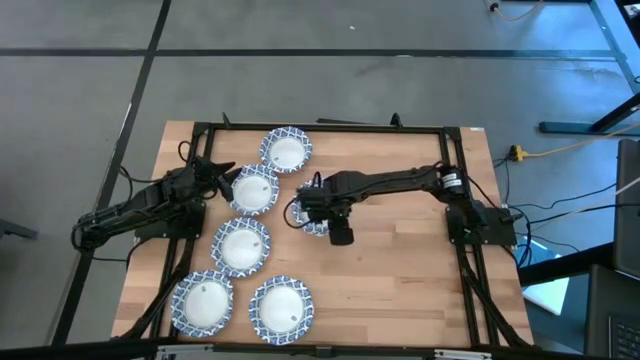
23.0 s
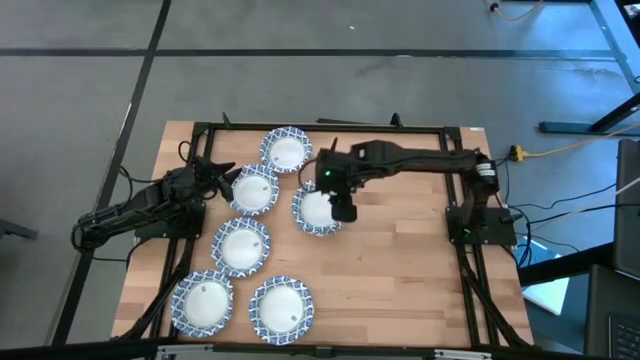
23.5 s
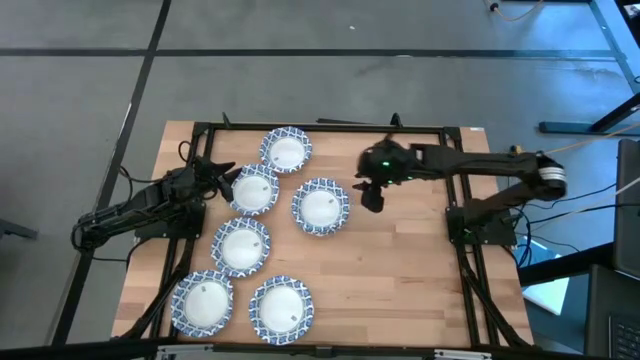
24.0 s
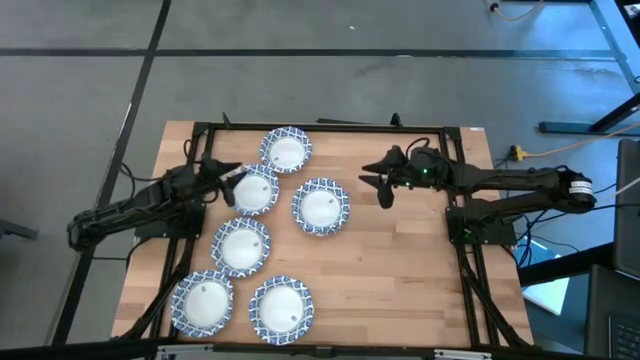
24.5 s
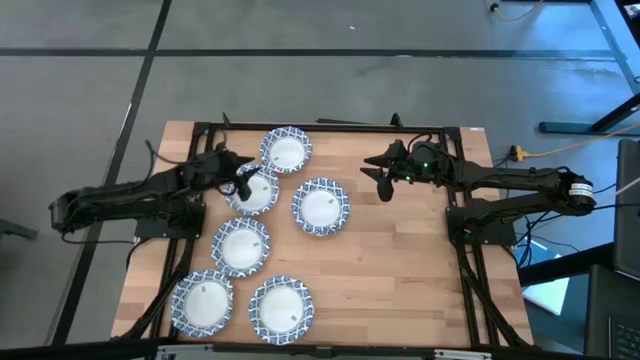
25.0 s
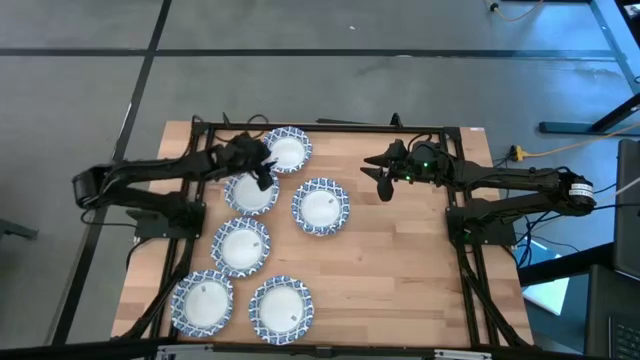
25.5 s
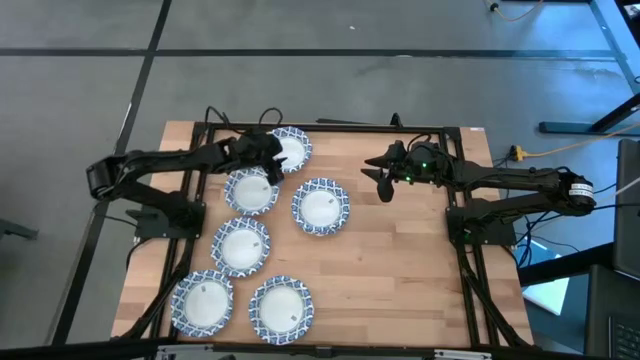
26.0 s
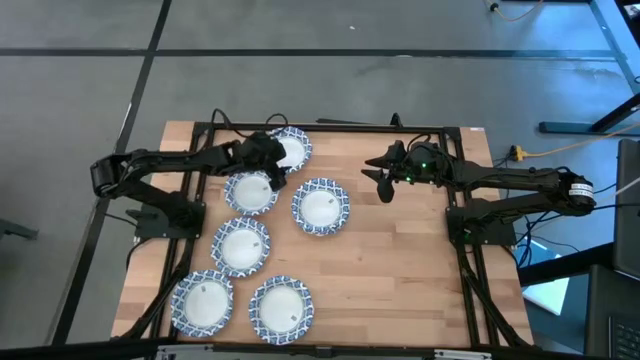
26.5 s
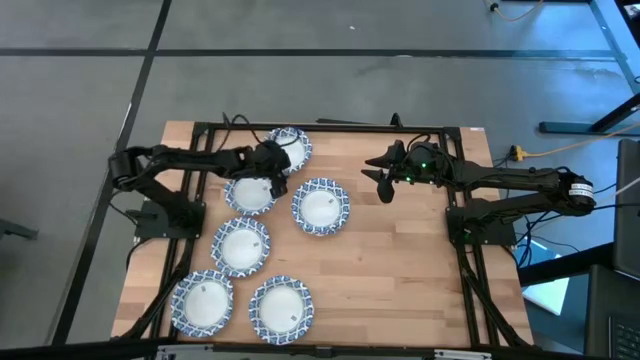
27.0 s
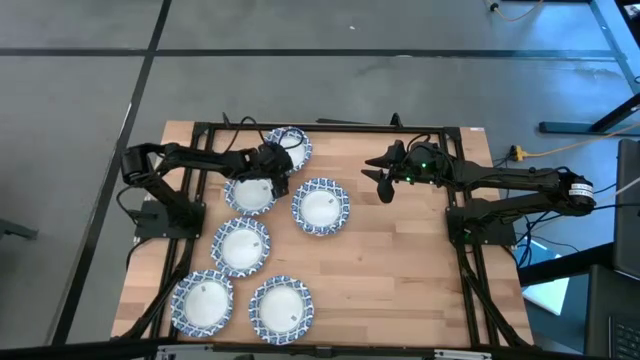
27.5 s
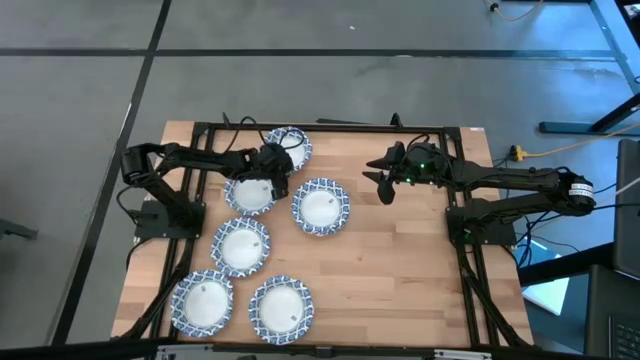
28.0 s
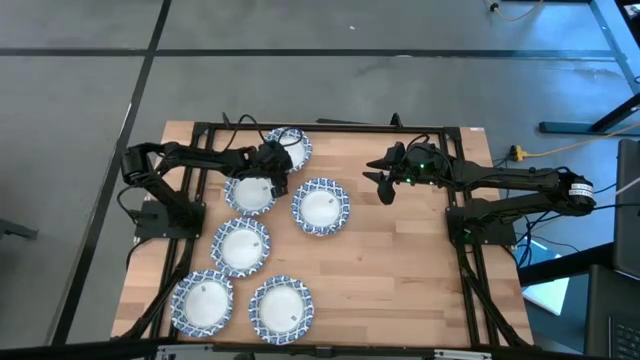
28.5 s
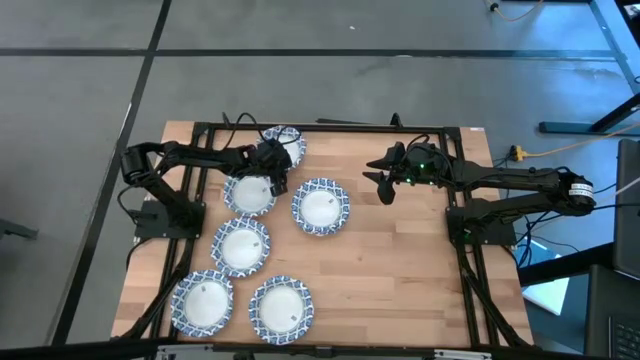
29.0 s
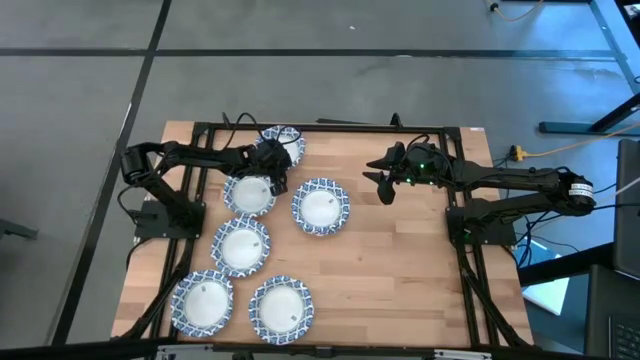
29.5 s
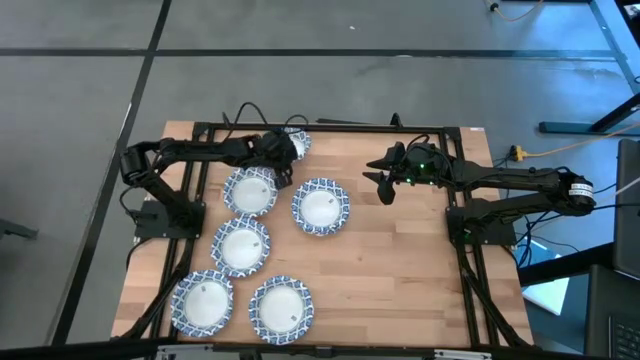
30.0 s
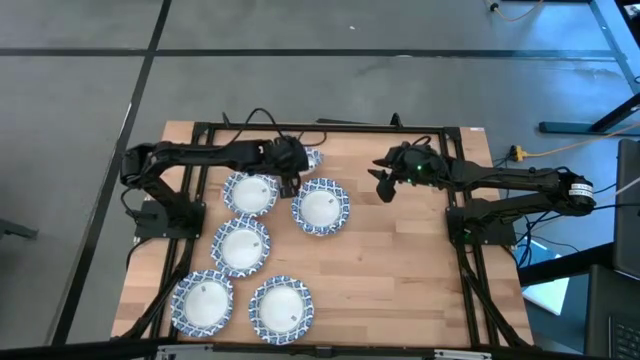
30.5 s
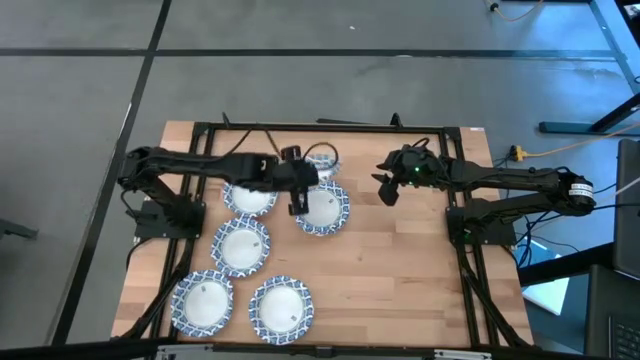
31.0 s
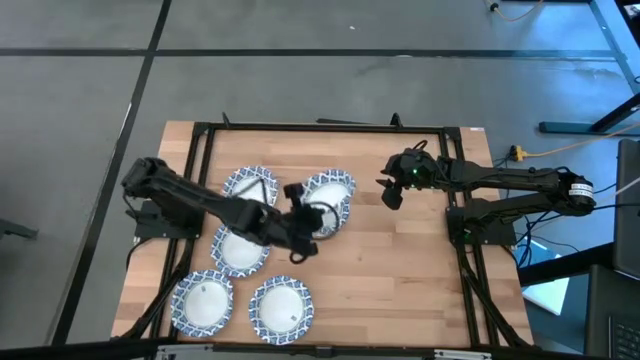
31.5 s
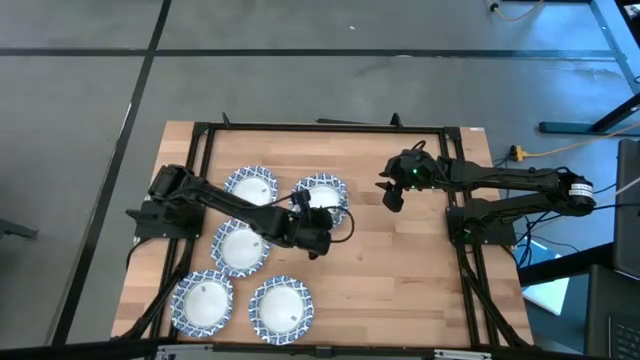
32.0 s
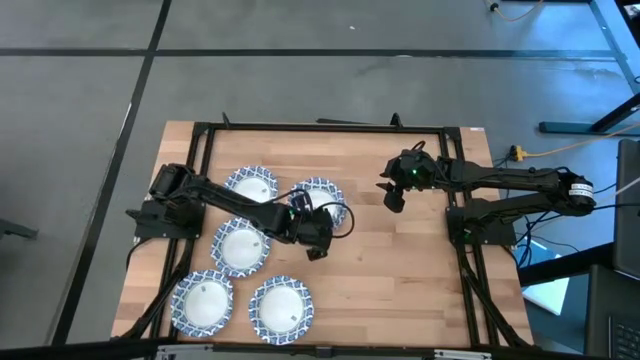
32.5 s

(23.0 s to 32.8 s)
Task: Nest bowls inside each other
Stack the white bowl on top of the other white bowls

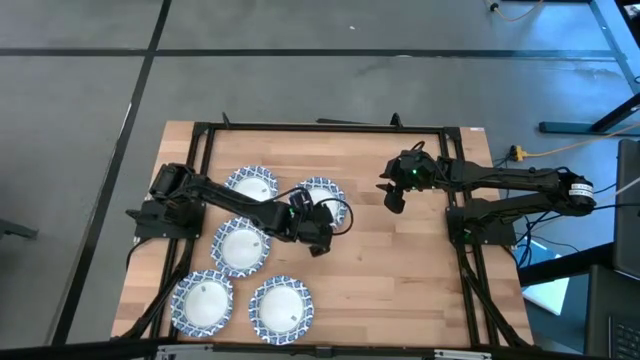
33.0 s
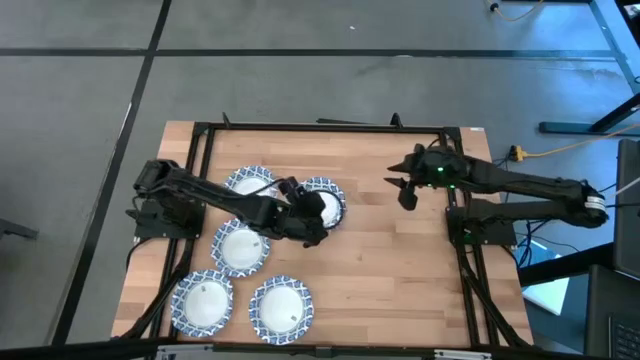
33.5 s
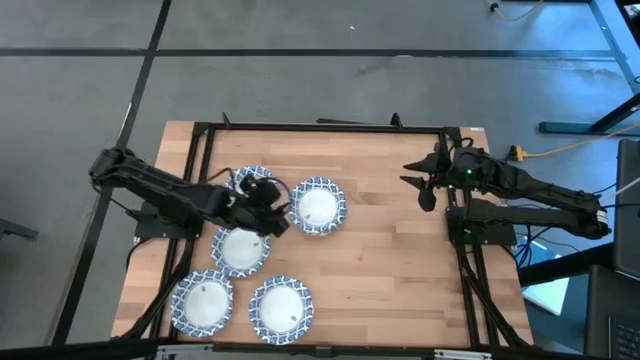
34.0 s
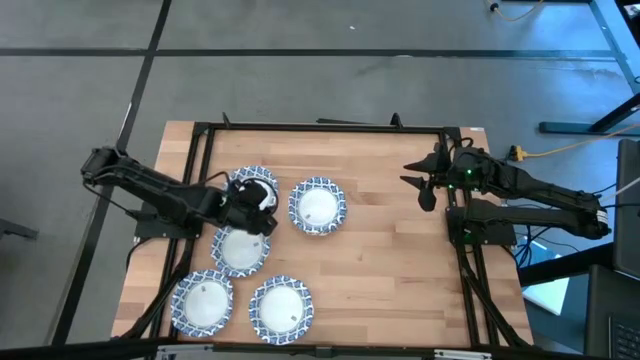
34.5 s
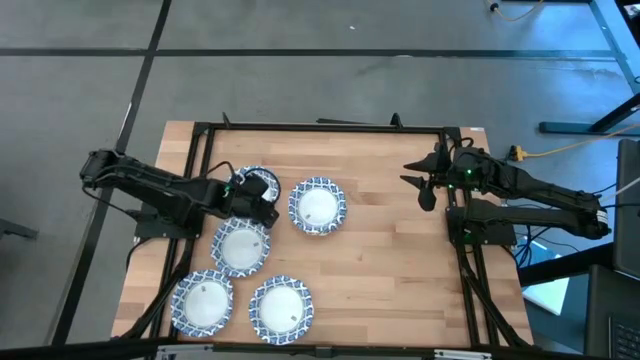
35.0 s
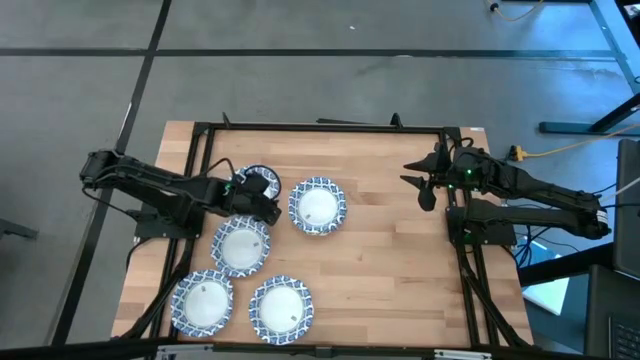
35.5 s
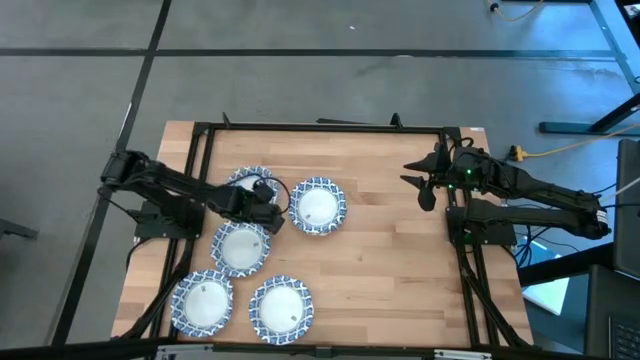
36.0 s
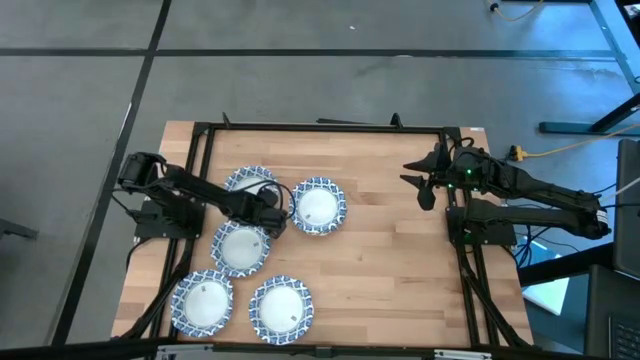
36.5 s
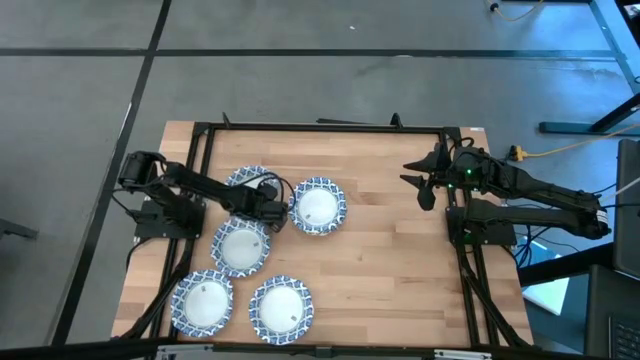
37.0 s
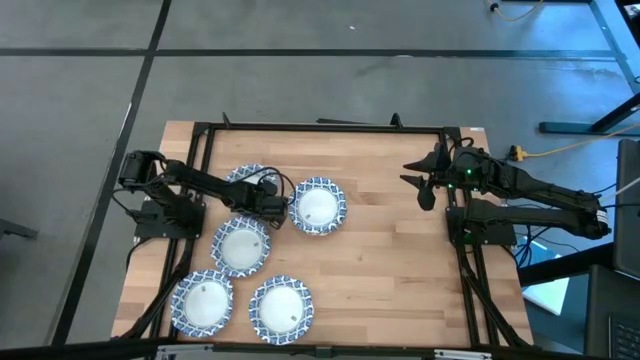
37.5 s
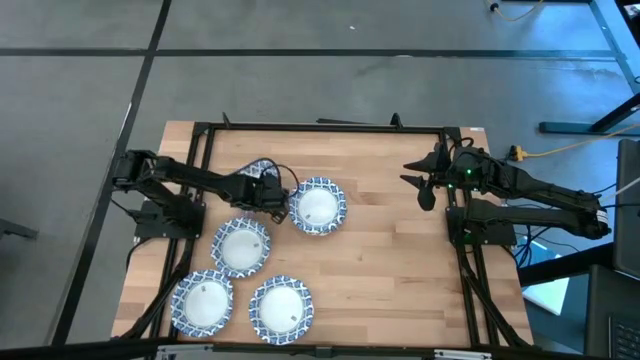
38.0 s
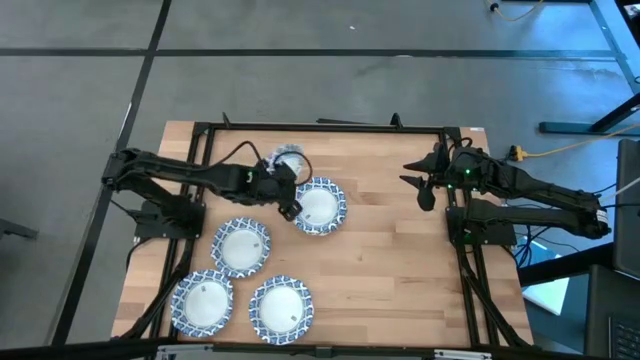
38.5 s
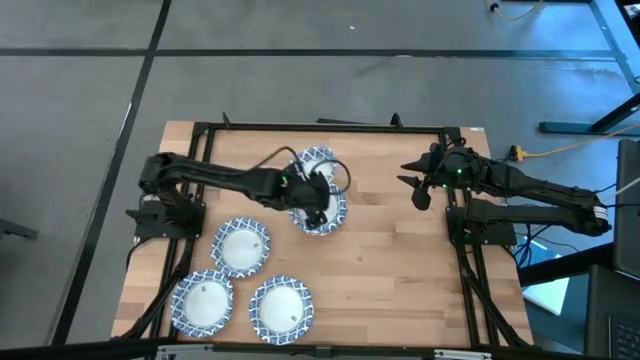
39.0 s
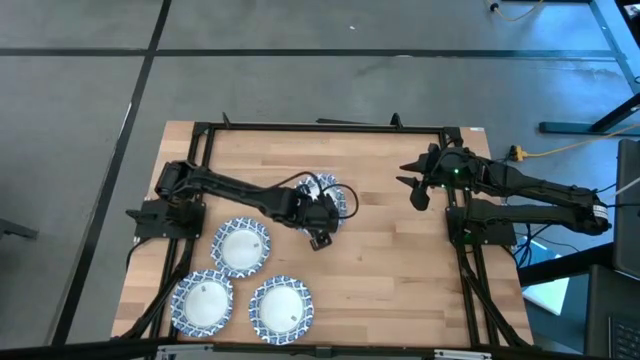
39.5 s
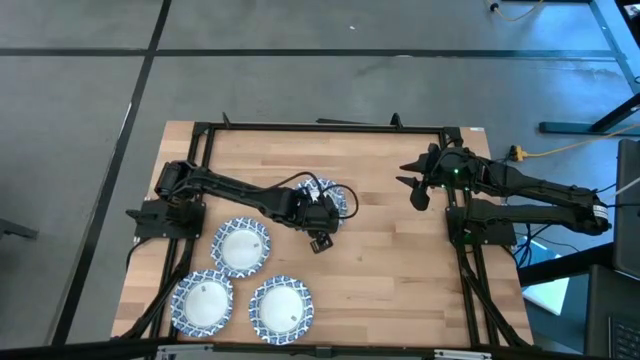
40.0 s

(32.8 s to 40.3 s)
Stack the white bowl on top of the other white bowls
